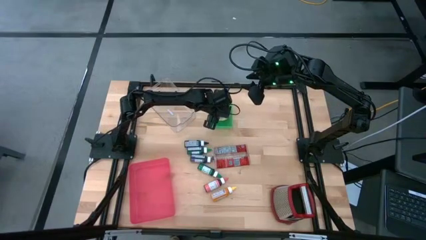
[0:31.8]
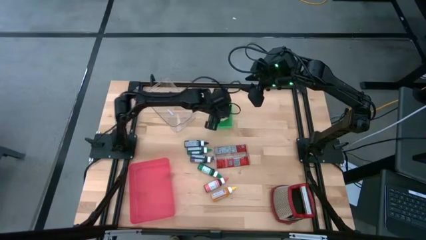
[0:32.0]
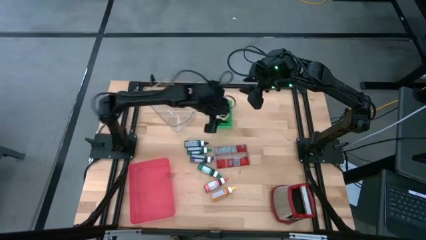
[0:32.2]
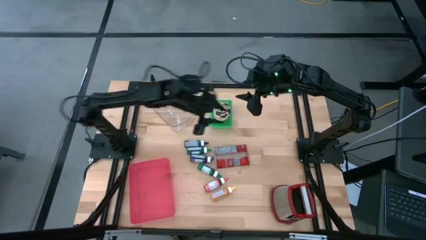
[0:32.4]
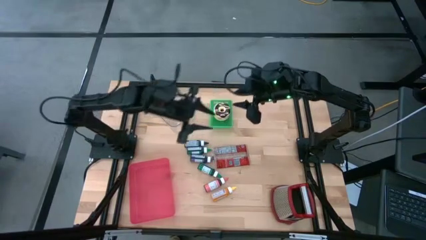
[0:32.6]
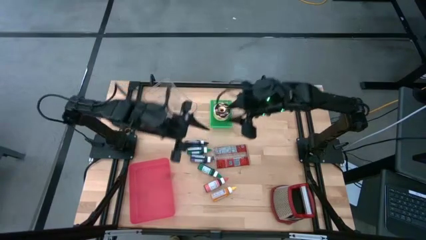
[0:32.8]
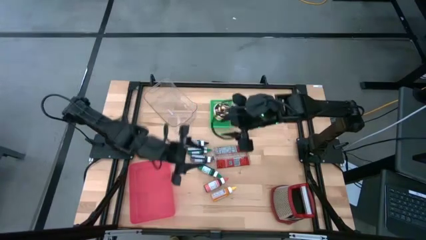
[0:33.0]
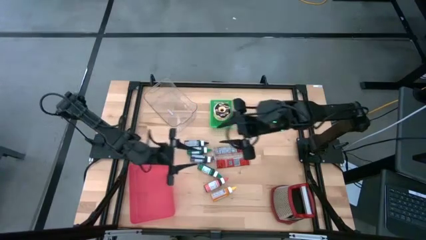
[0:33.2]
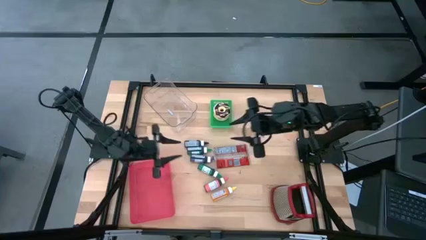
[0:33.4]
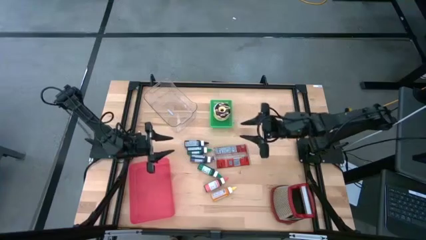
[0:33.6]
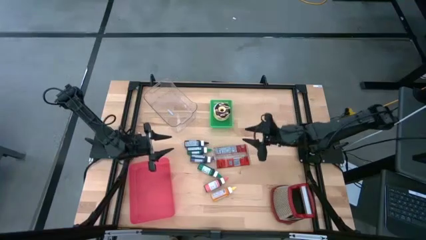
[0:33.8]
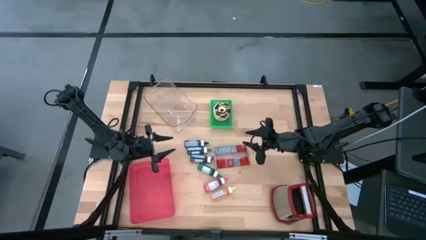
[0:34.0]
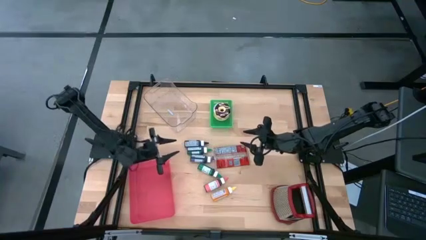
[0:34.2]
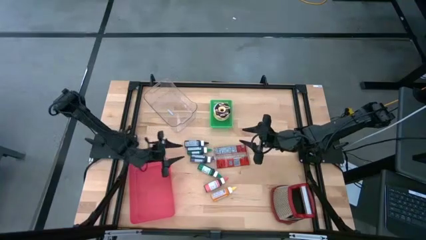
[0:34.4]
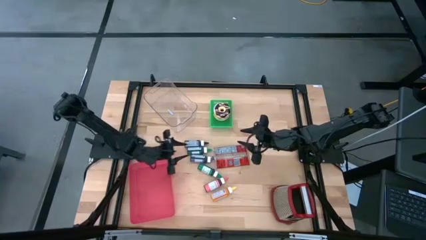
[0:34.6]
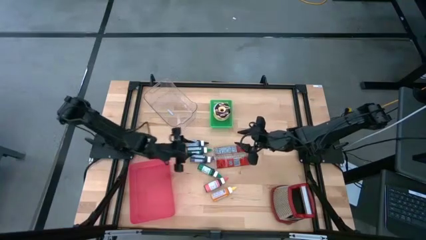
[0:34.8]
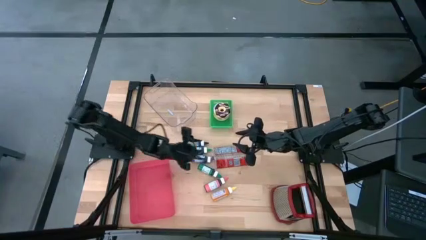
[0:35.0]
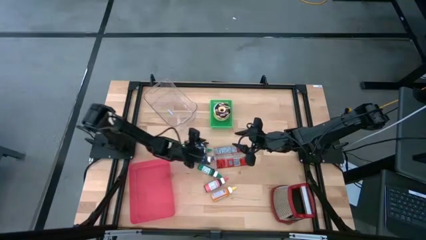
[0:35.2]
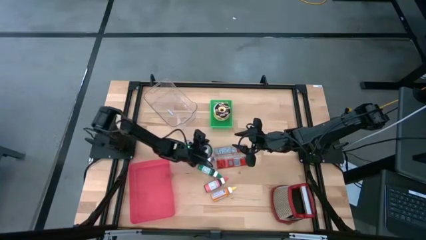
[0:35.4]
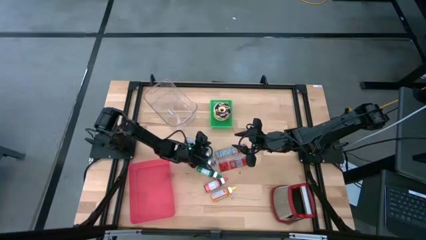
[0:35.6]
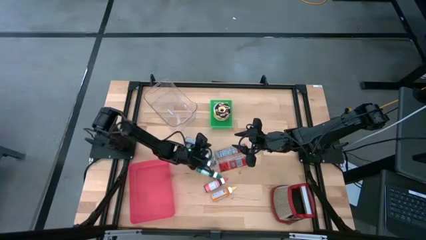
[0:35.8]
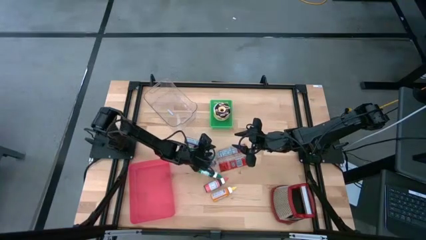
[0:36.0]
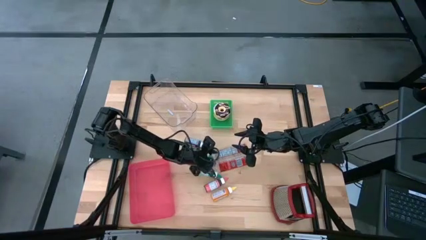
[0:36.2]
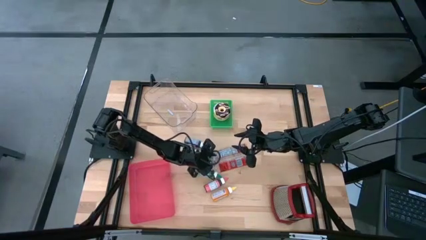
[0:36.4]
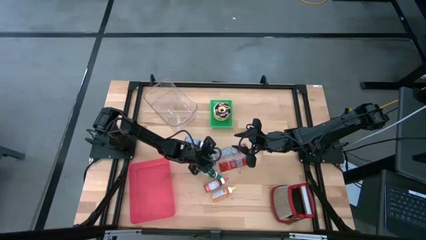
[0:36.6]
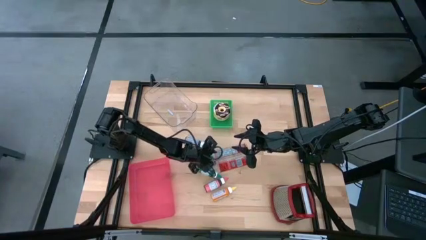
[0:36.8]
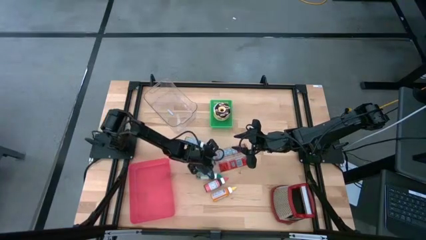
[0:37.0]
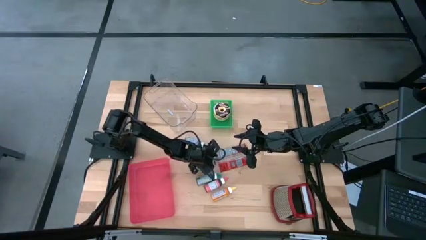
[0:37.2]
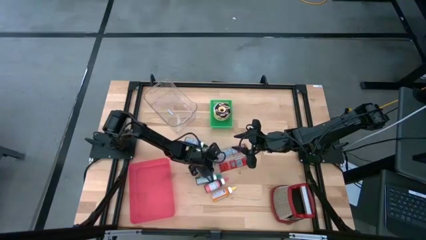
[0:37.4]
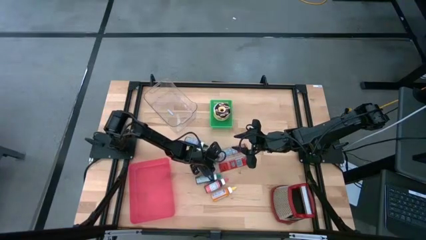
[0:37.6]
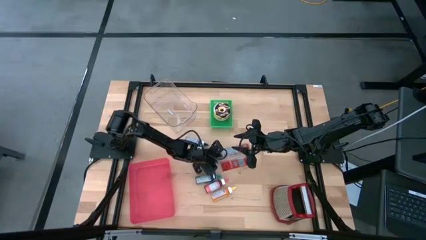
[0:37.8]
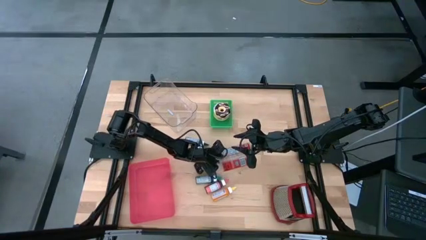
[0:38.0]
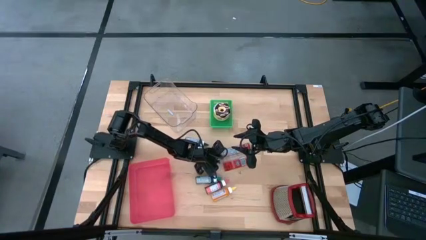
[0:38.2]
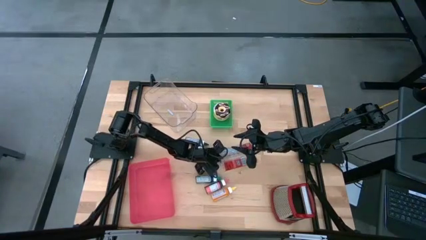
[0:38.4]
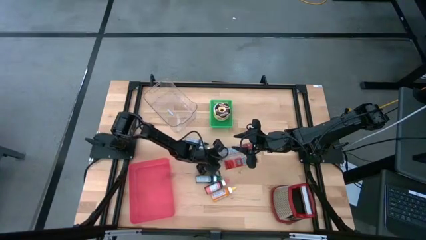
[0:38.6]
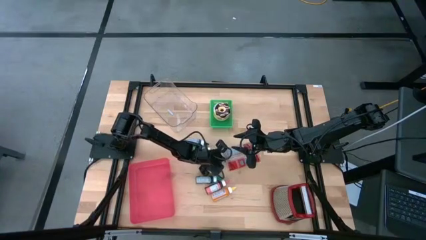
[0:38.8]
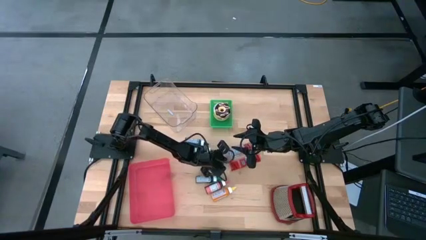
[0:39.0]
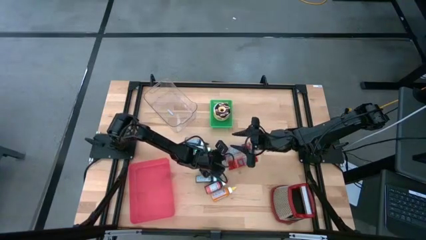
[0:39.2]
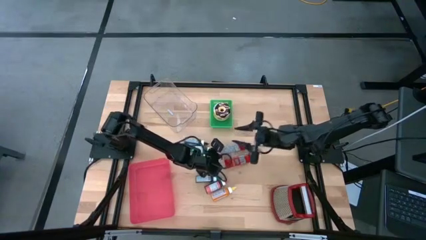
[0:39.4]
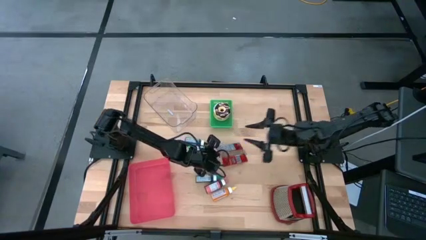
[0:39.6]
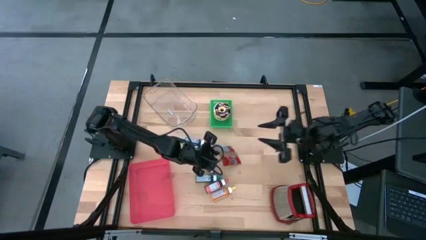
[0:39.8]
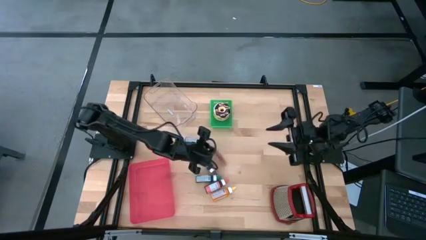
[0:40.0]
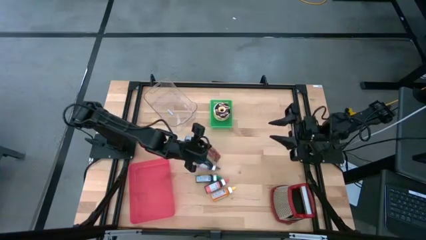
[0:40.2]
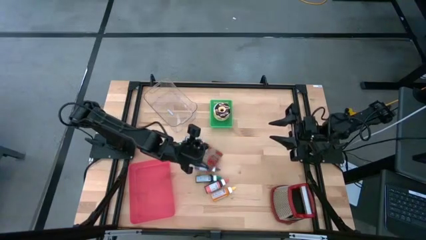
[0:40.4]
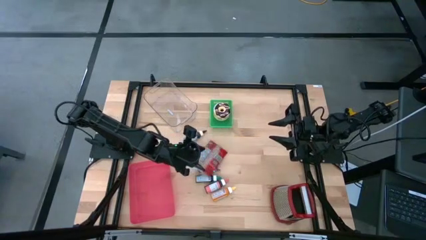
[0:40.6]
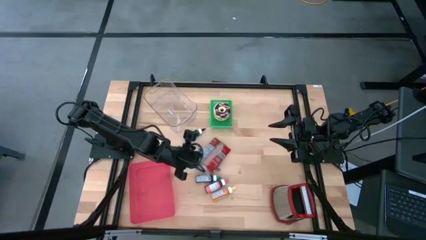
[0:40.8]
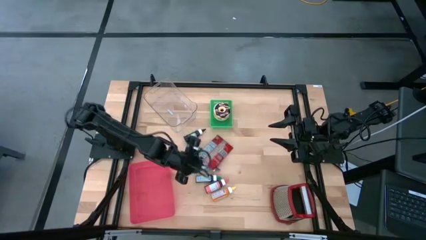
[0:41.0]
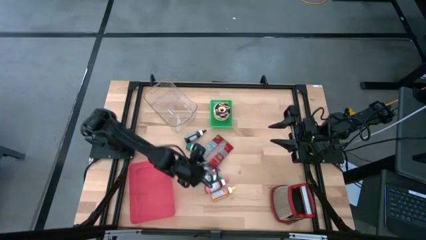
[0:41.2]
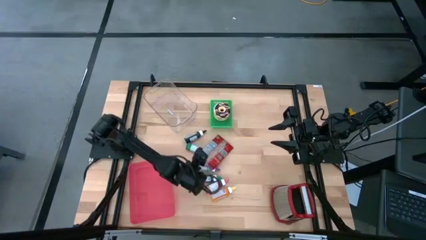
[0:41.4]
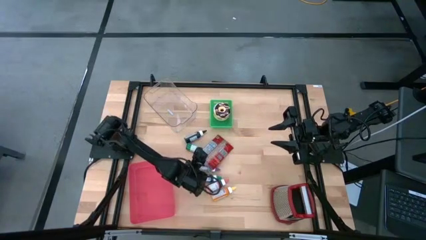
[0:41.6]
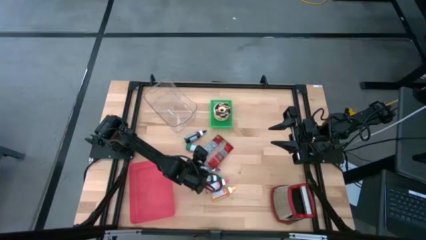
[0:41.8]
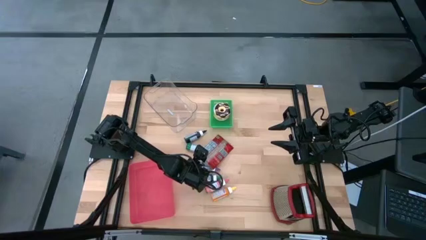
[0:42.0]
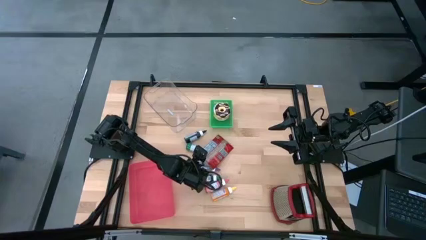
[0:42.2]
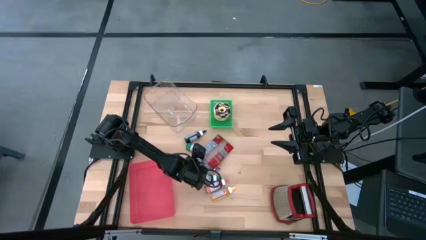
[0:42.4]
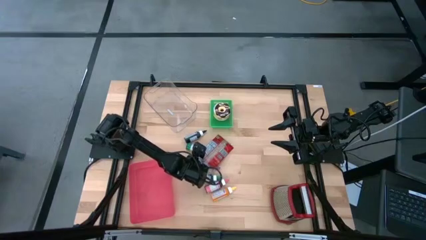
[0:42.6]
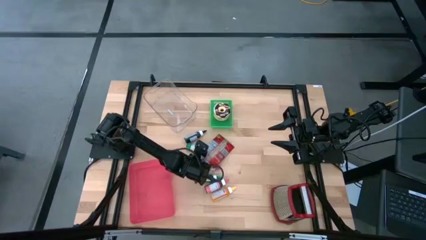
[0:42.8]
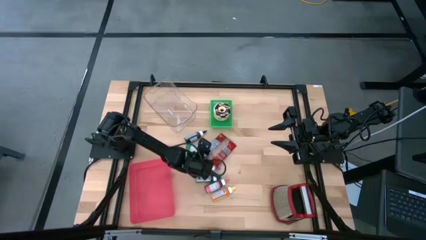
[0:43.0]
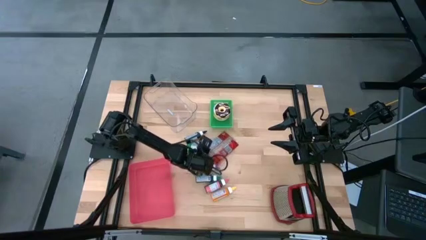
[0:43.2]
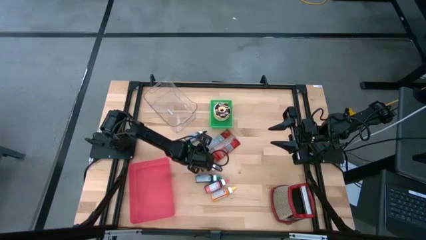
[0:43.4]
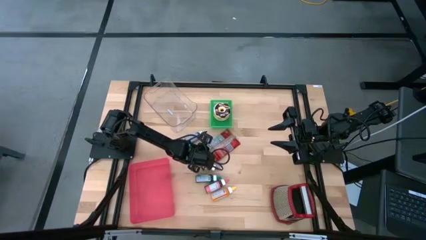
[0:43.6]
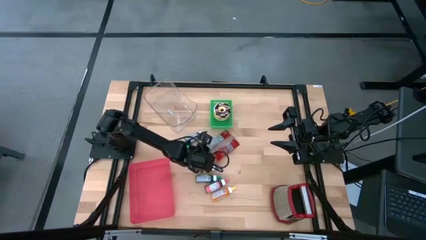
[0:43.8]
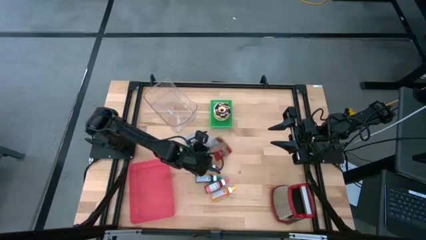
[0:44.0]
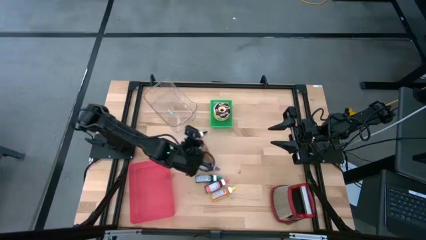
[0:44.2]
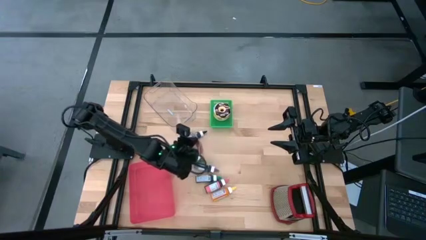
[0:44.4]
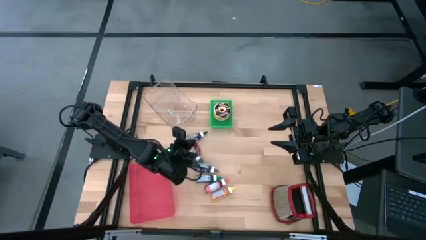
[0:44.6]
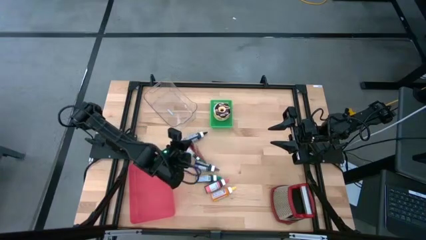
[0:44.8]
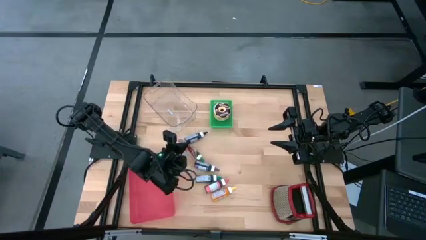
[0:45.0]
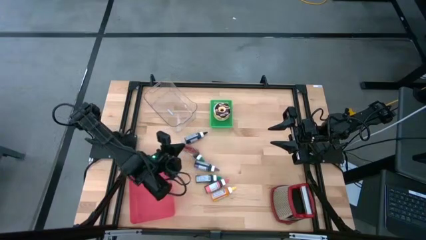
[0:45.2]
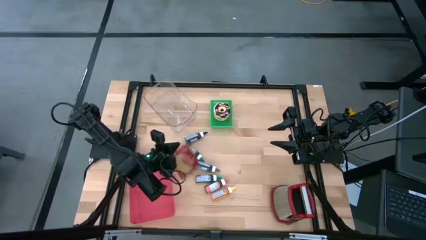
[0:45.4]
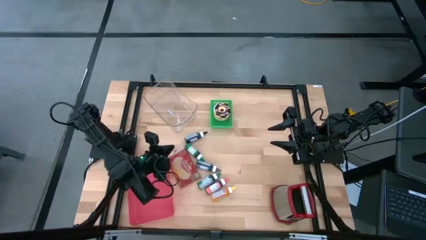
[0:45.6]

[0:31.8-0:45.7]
Put the red popcorn bag into the pink bin
